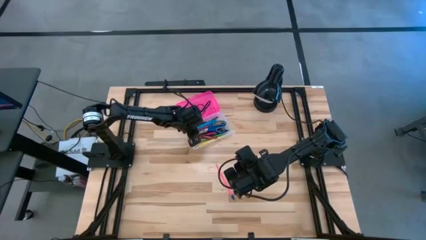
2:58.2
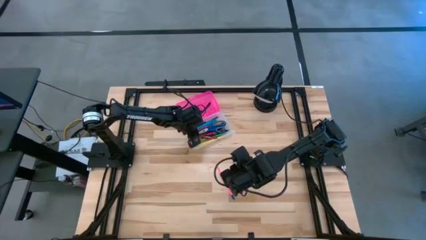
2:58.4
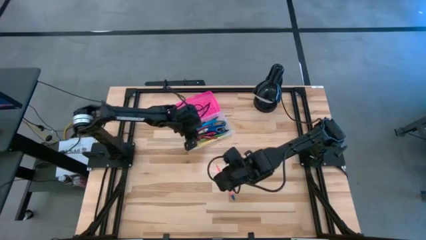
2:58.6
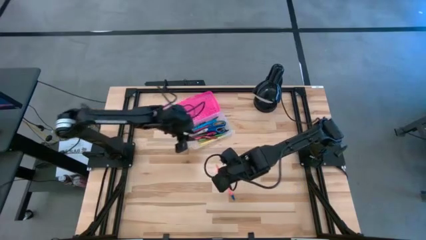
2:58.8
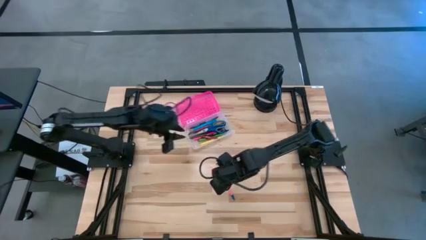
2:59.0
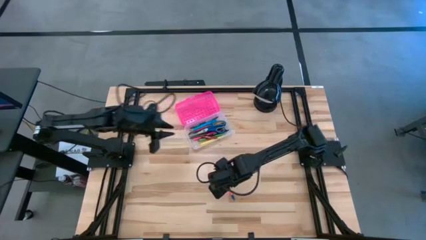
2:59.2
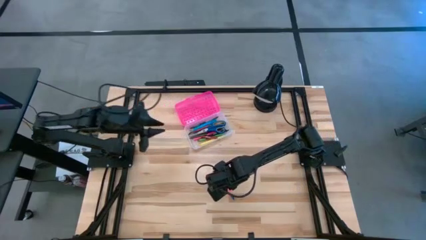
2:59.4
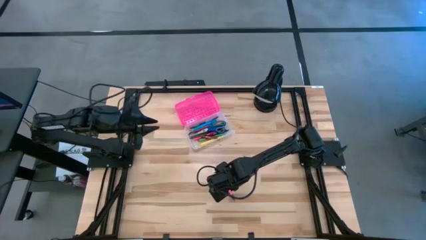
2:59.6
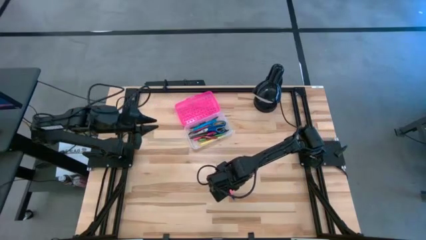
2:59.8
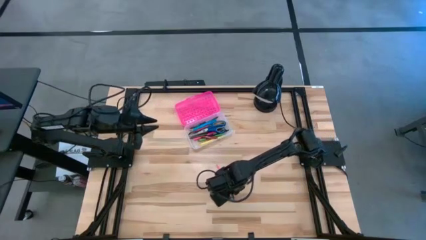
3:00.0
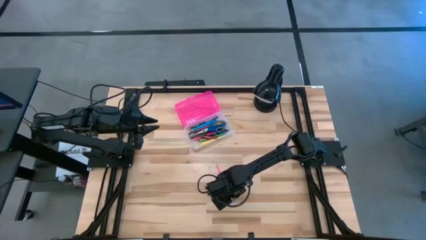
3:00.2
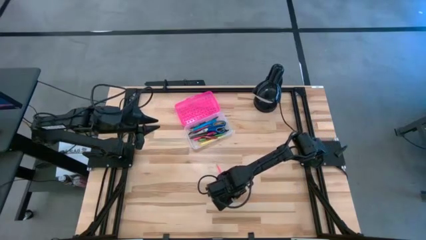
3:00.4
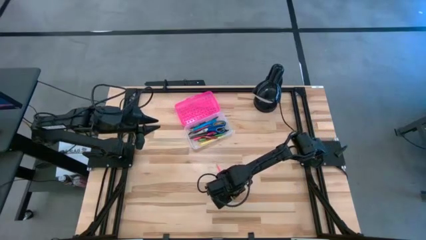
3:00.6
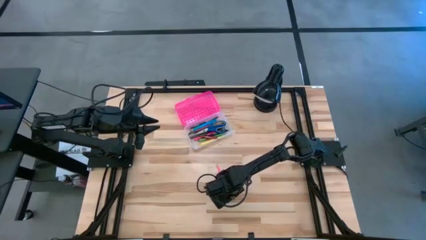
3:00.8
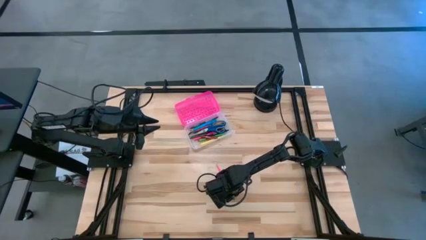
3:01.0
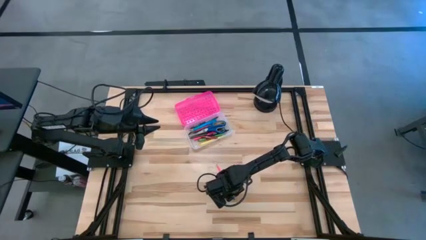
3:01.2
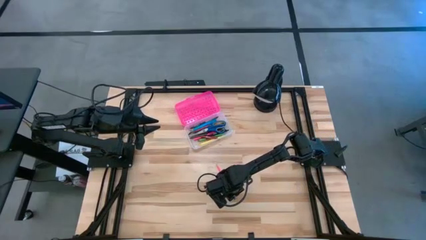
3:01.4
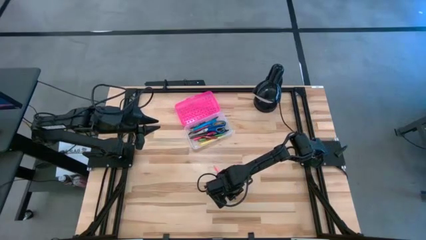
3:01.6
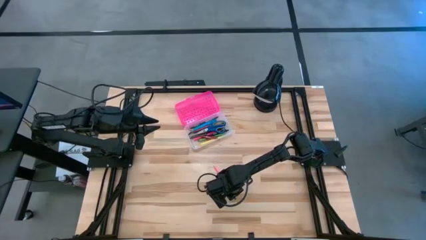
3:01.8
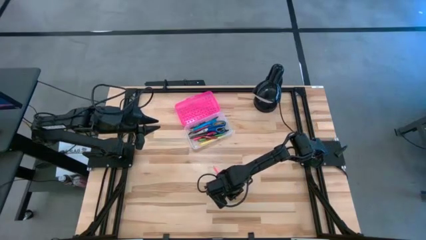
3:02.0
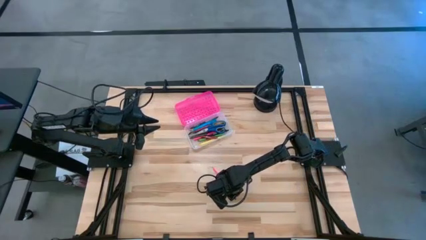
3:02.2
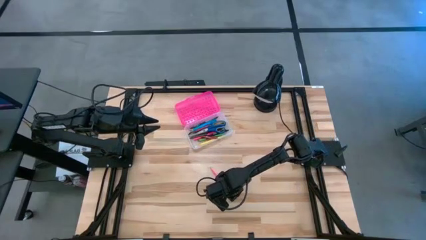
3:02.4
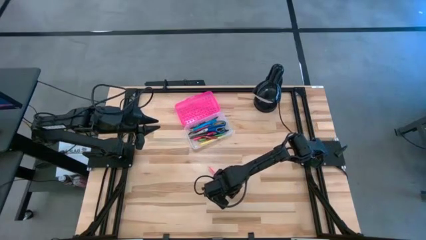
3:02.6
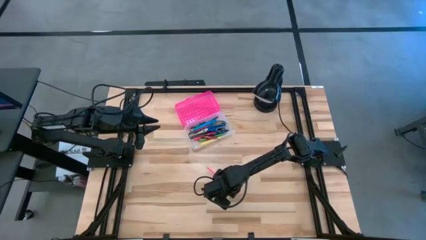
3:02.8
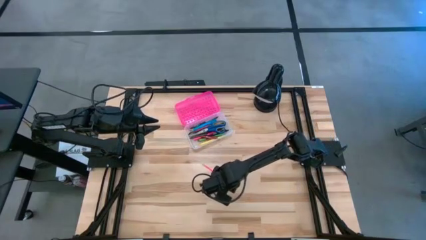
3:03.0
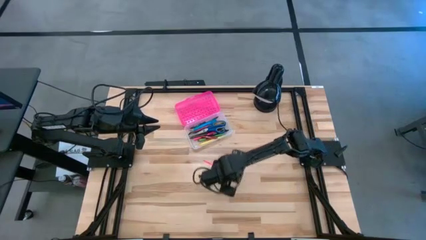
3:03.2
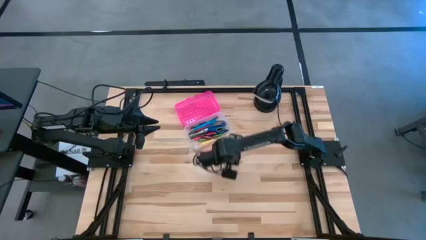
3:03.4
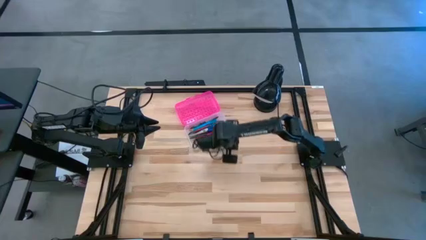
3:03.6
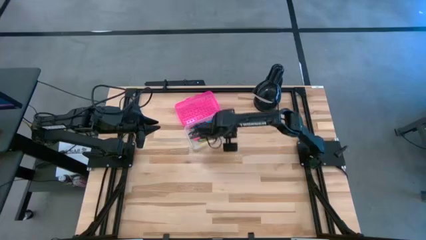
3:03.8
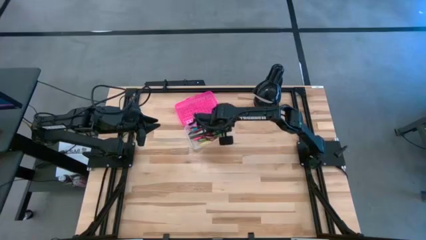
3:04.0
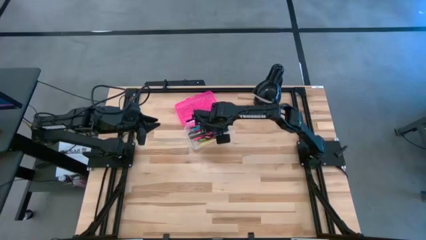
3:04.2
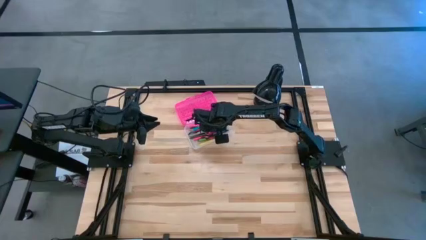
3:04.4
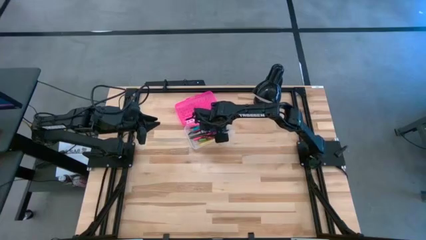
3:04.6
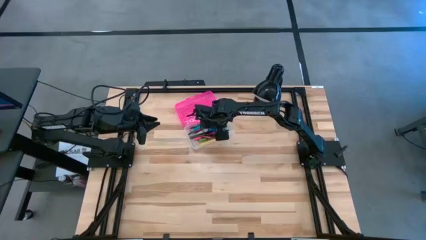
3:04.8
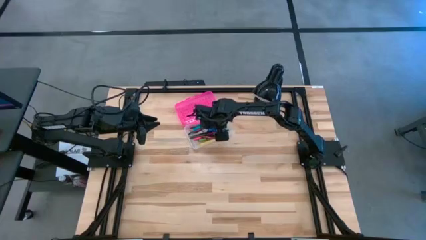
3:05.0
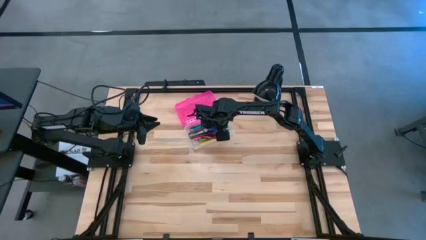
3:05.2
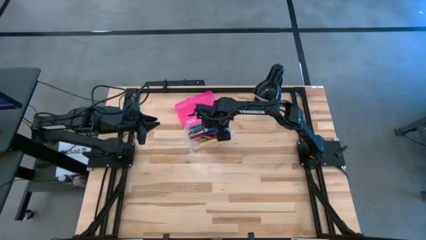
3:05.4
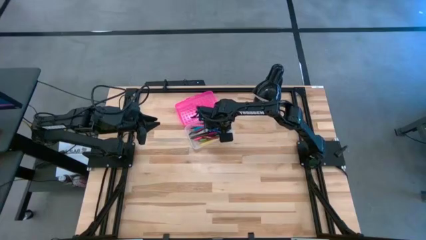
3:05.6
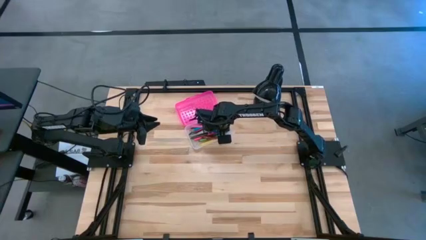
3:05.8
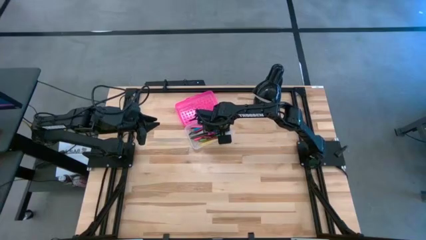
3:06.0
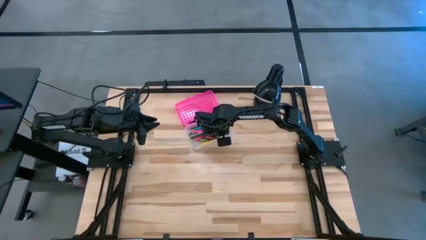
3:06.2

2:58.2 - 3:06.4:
Task: Pick & place school supplies into a supply box
Put the pink pencil into the pink supply box

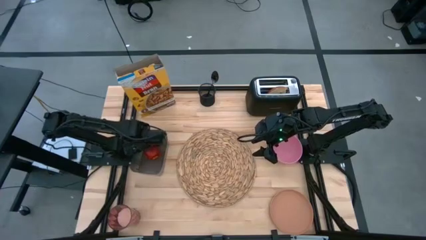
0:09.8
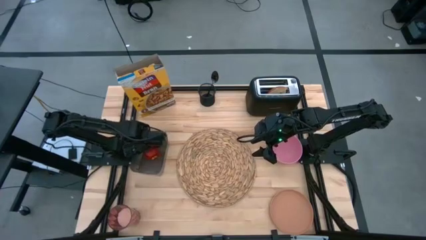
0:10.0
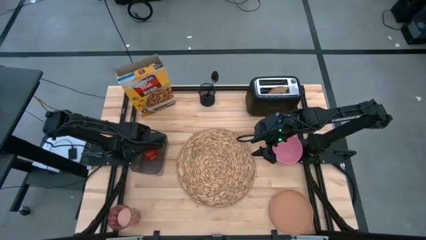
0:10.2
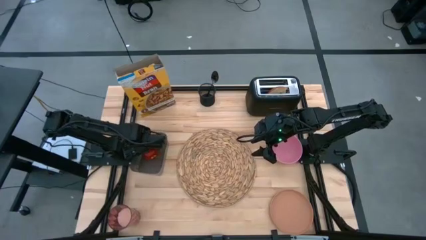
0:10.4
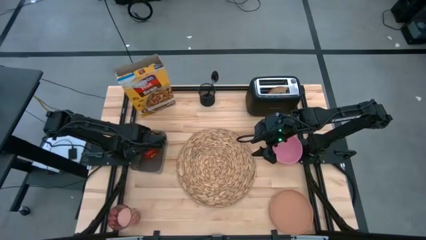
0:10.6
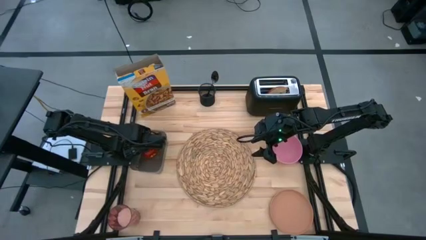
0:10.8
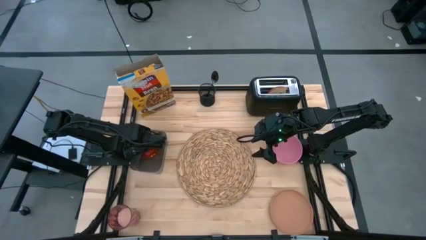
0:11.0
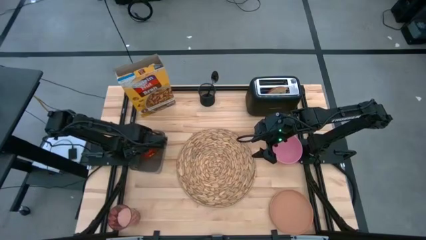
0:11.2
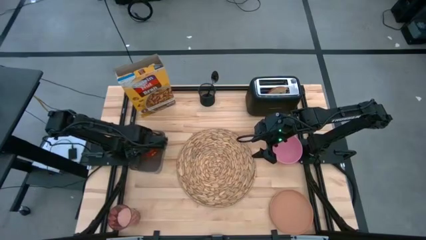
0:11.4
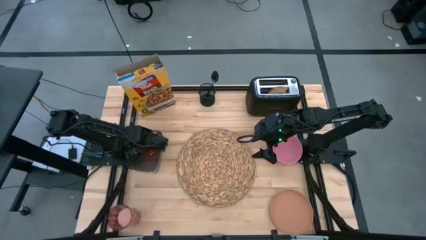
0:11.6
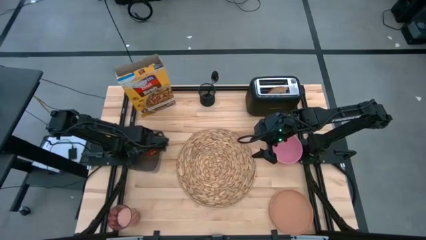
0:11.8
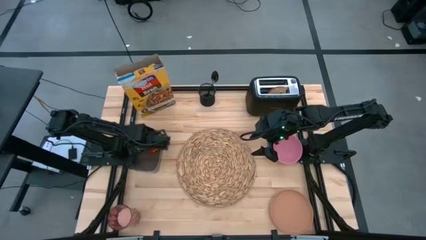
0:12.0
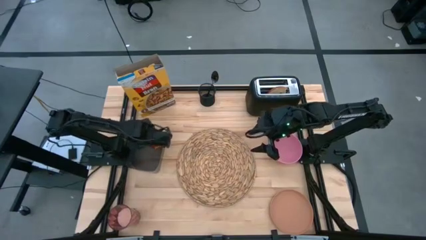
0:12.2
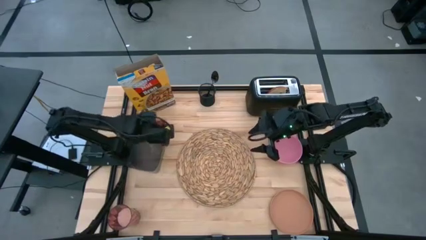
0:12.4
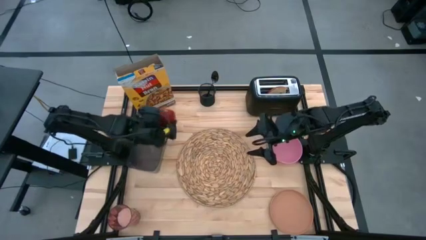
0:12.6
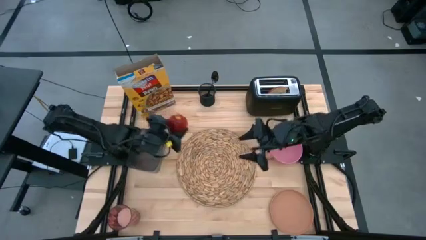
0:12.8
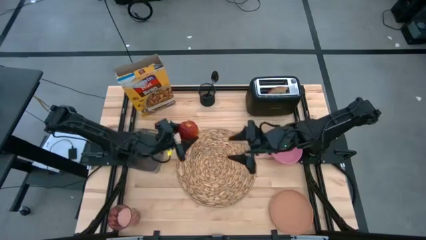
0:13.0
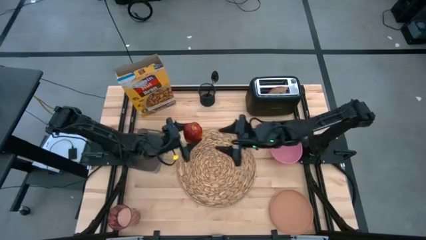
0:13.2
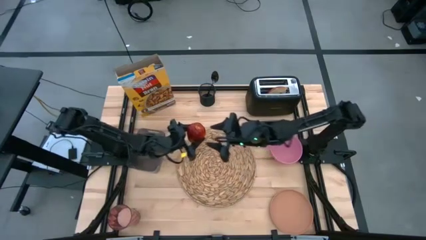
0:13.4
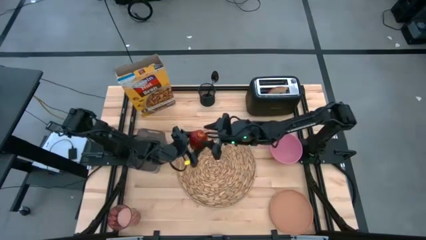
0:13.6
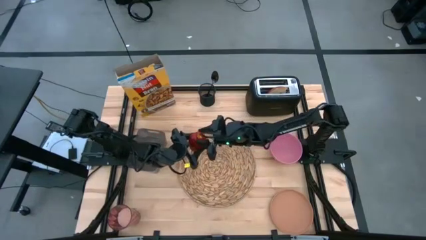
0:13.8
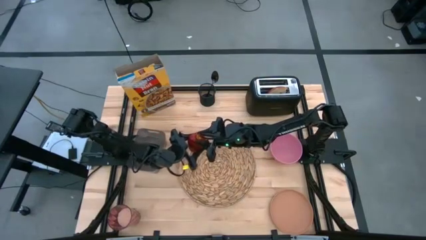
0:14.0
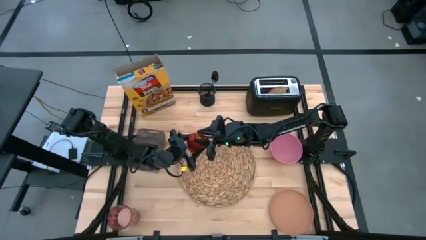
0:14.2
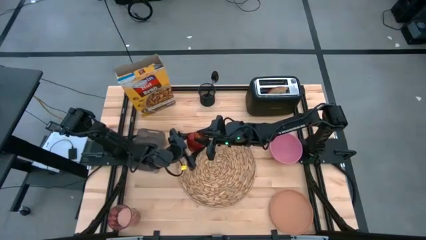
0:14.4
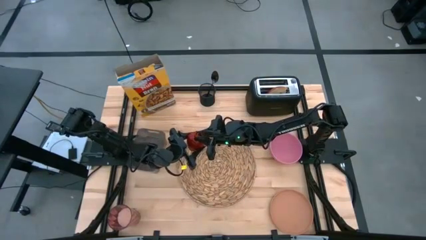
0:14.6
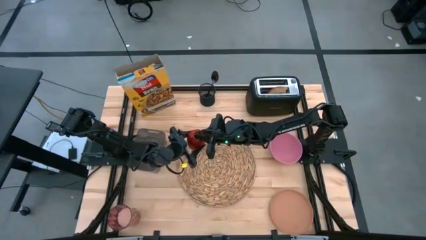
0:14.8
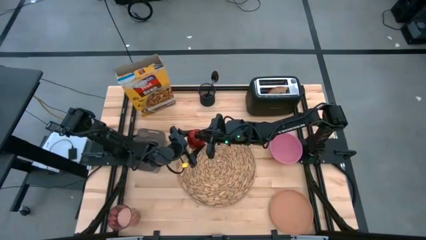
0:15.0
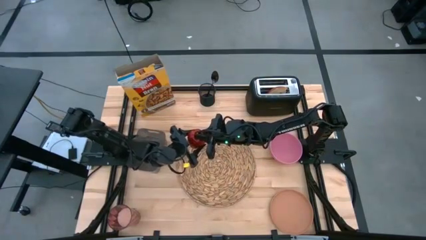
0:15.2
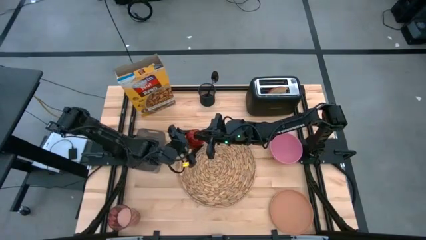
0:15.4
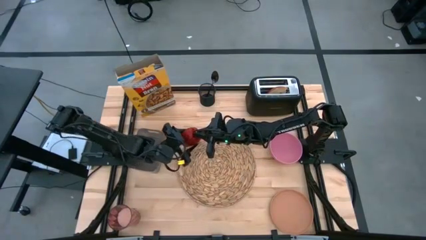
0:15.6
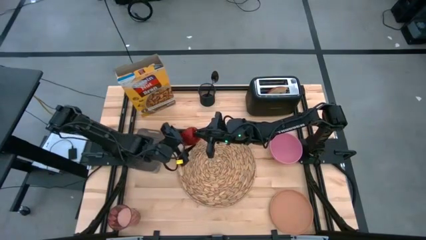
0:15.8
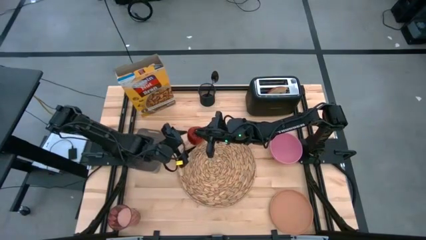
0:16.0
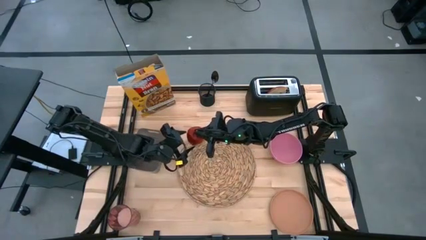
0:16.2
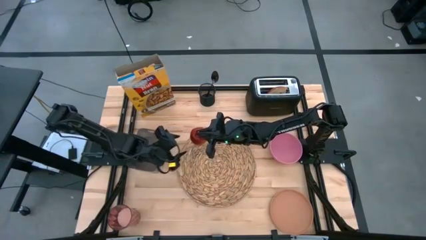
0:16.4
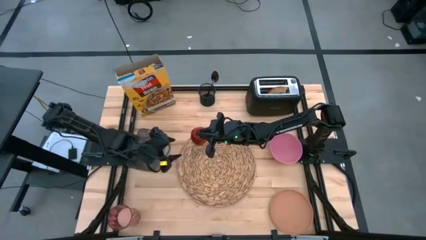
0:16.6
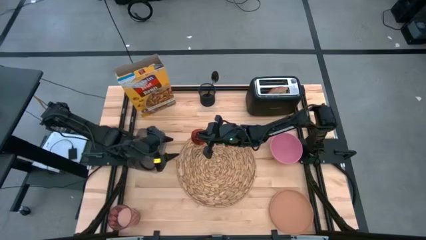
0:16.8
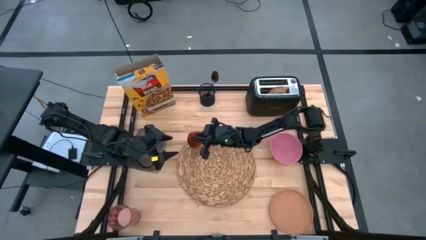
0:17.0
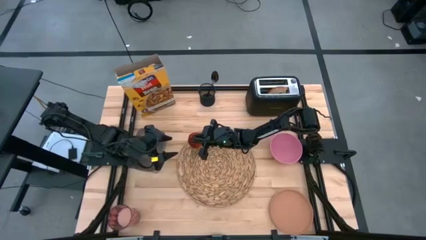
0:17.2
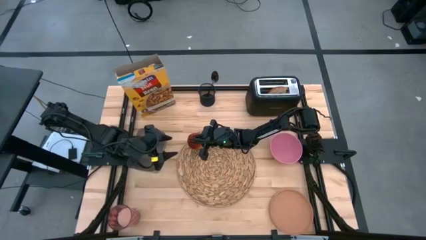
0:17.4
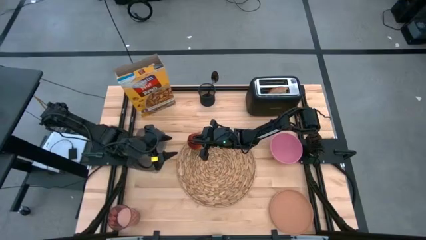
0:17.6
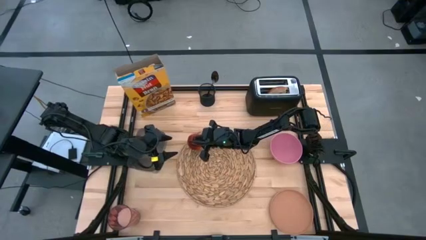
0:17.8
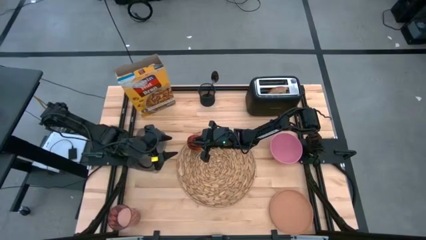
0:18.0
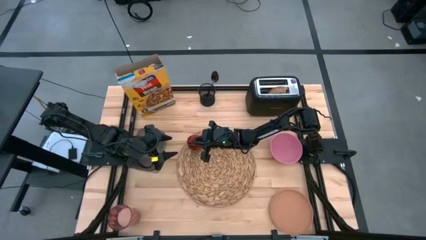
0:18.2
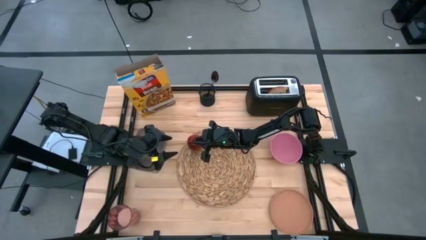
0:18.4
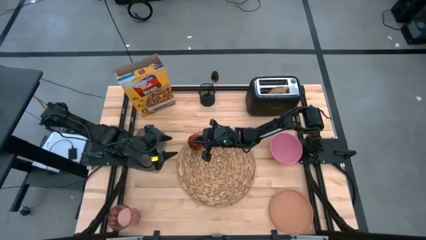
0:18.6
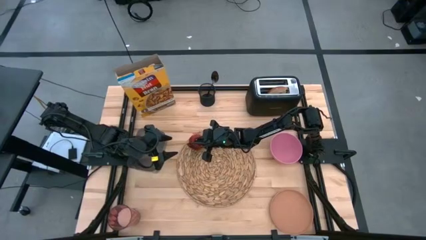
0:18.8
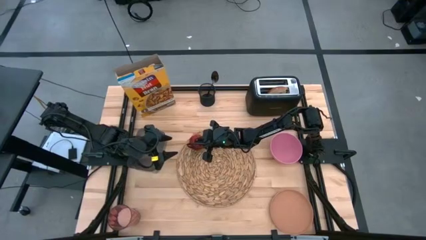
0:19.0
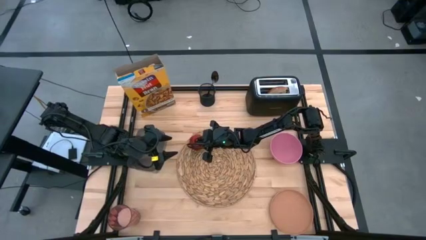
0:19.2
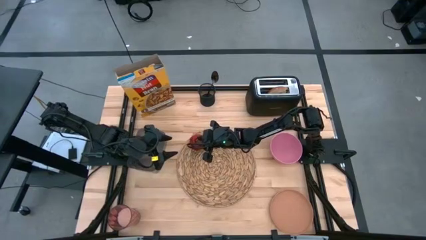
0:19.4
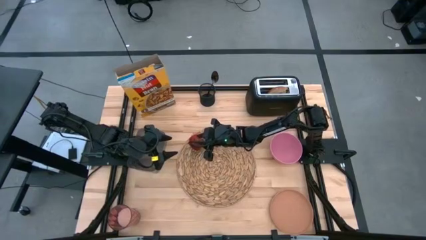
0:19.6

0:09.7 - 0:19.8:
Task: Arrange a breakfast setting
Put the apple on the brown placemat
